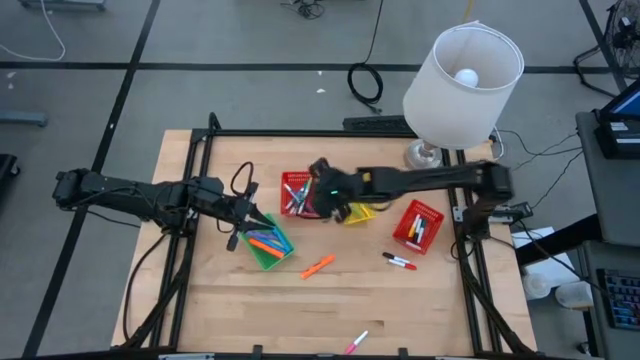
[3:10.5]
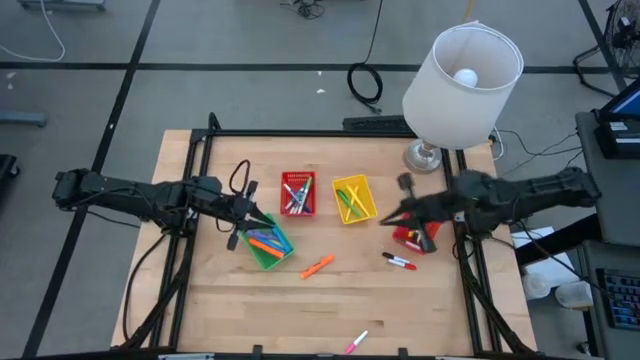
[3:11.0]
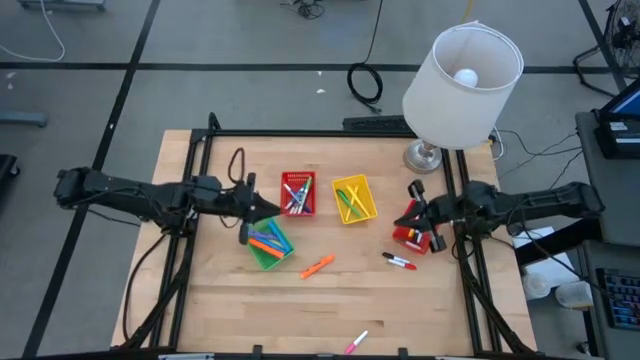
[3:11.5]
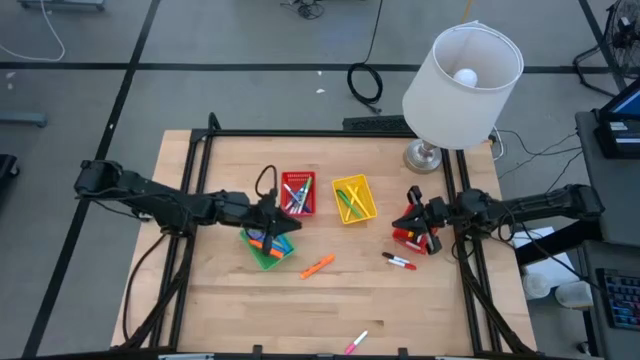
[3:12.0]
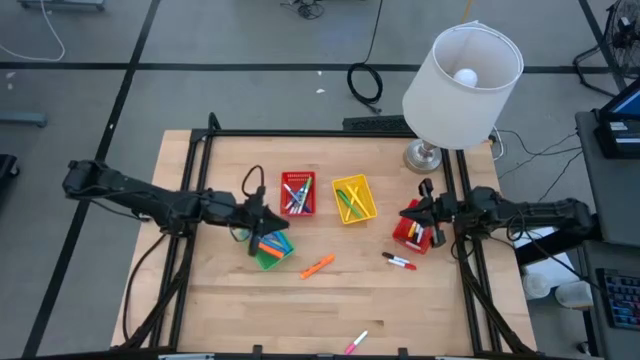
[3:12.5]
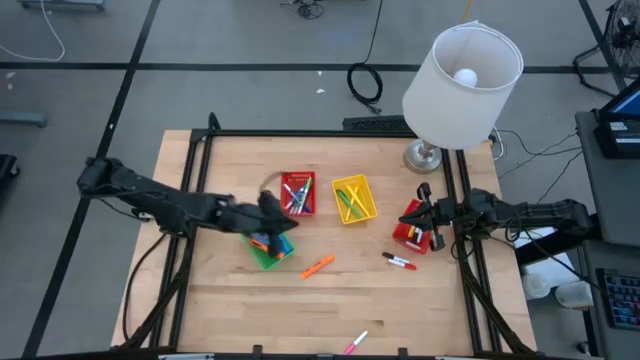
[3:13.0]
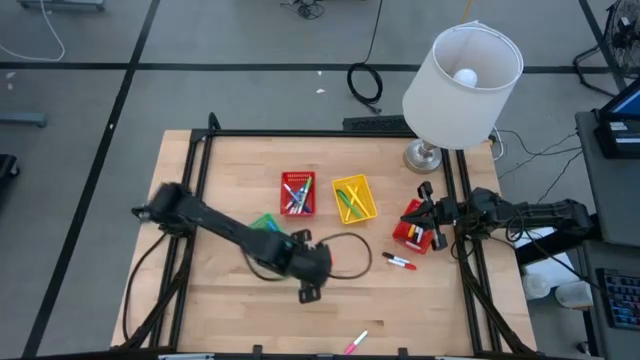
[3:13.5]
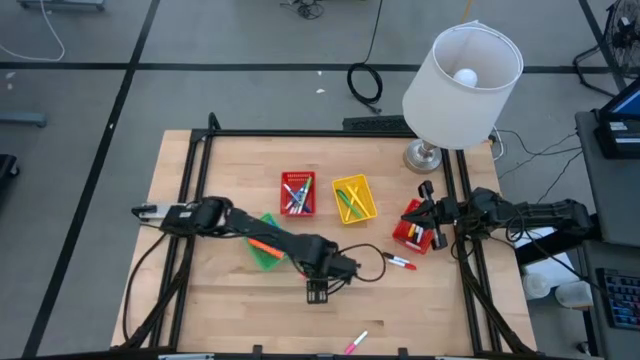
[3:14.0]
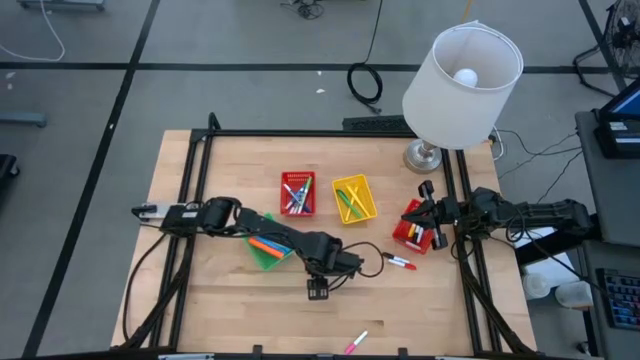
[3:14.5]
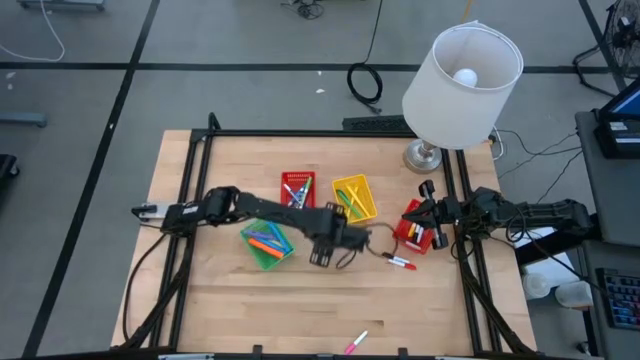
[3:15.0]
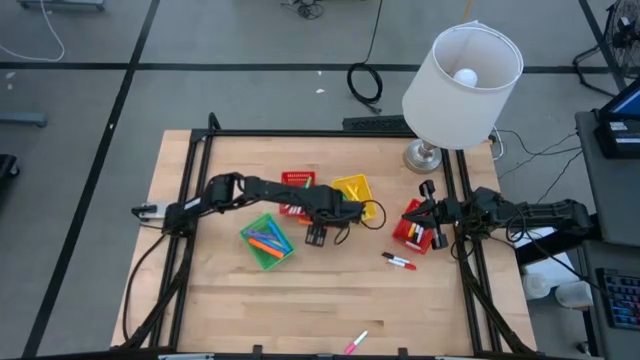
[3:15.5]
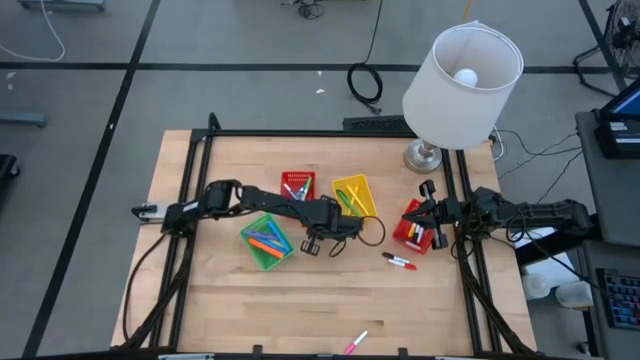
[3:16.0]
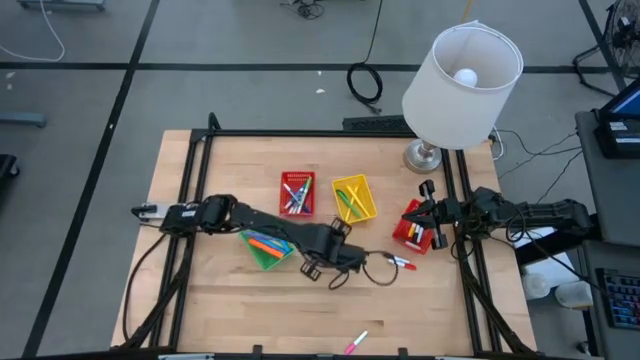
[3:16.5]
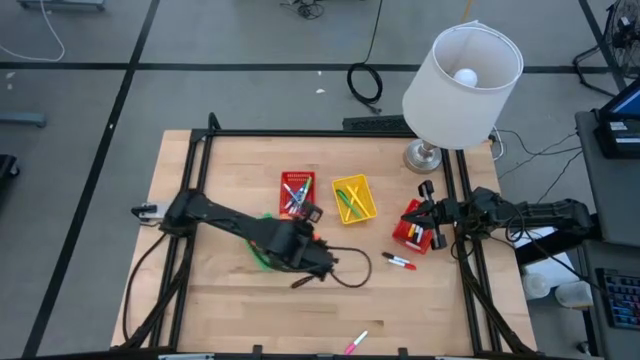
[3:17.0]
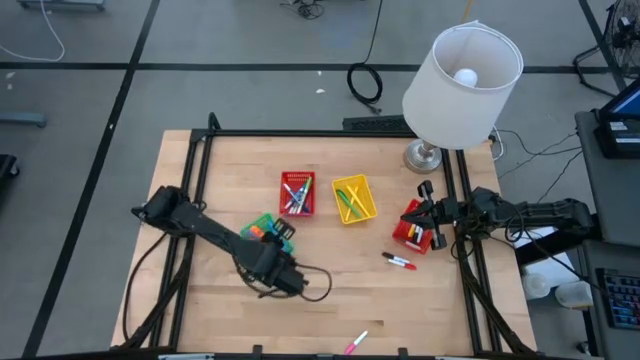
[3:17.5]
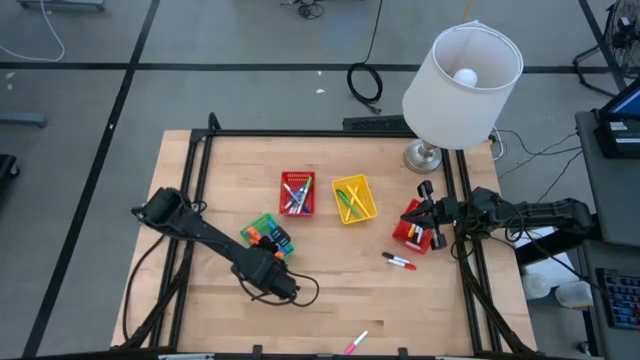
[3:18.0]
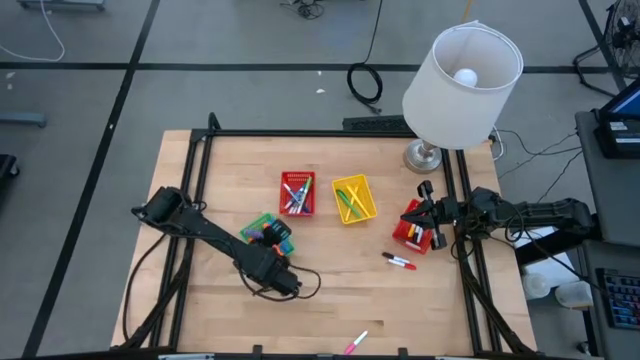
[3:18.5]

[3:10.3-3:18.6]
Task: Pick & Place Markers
Put the orange highlighter into the green bin

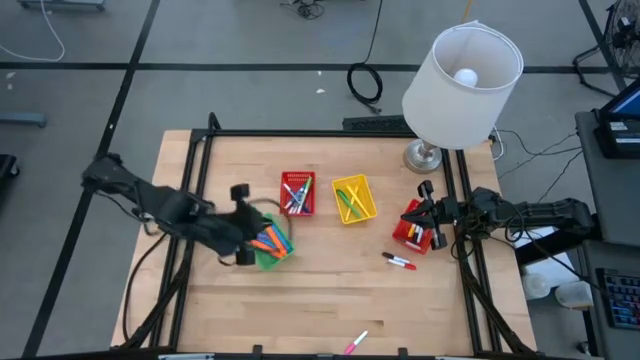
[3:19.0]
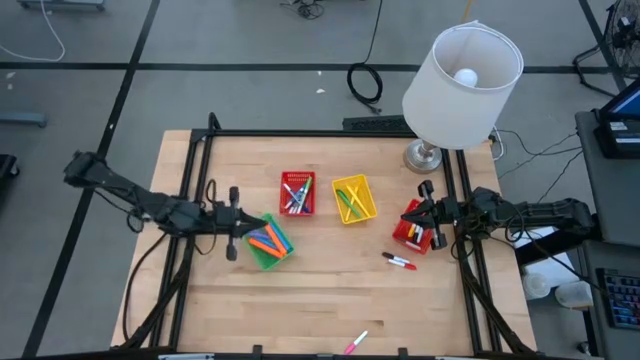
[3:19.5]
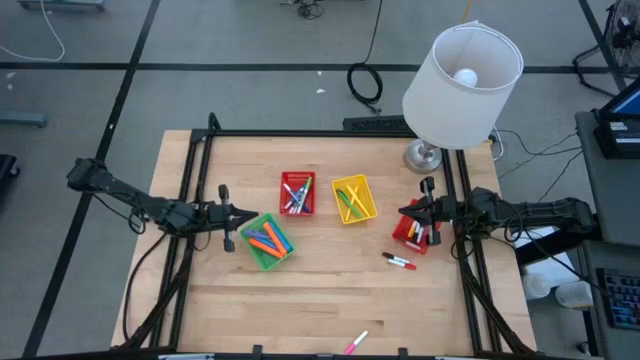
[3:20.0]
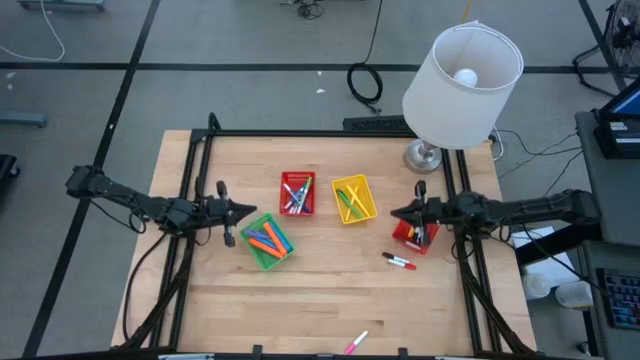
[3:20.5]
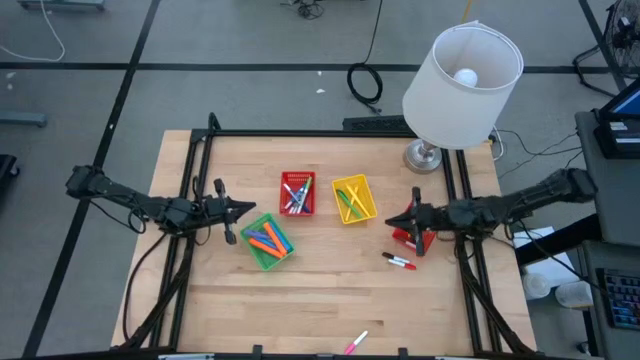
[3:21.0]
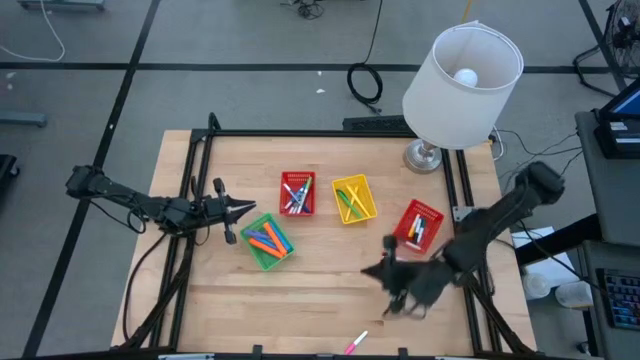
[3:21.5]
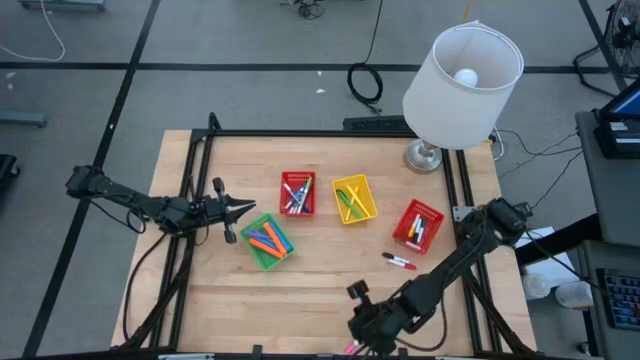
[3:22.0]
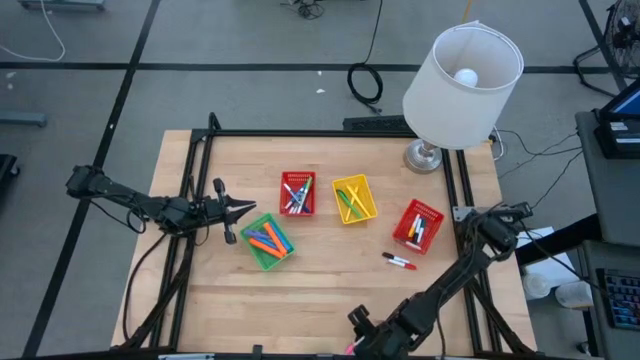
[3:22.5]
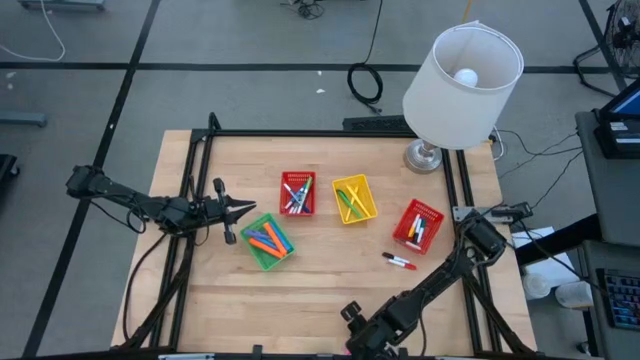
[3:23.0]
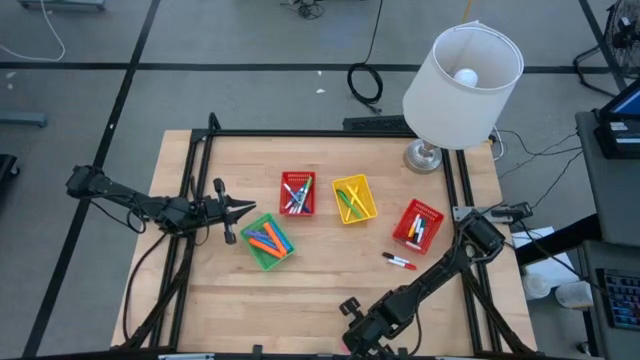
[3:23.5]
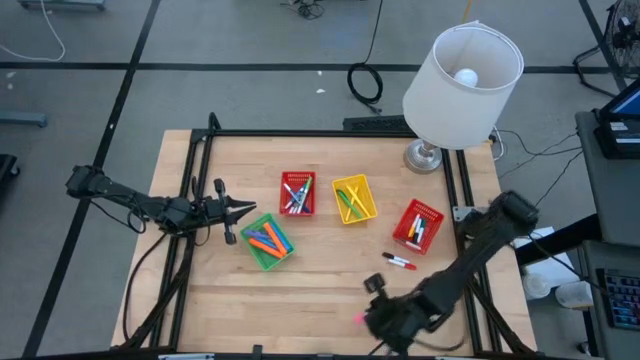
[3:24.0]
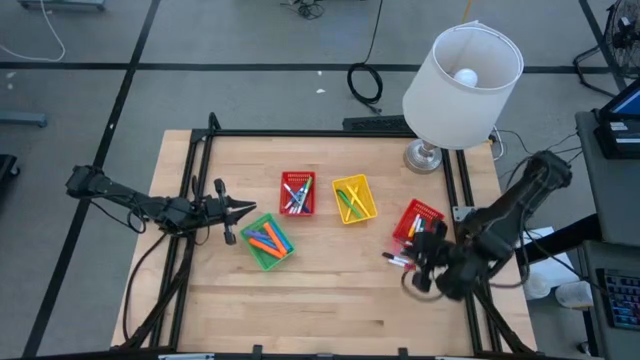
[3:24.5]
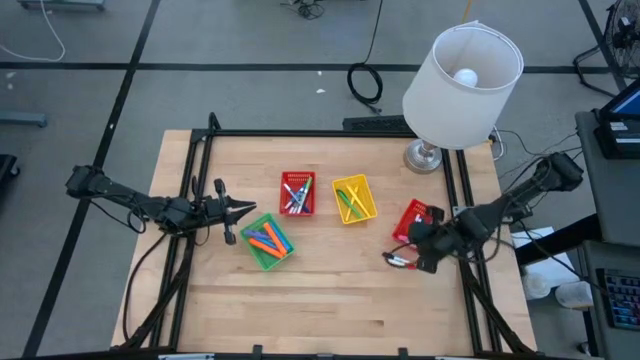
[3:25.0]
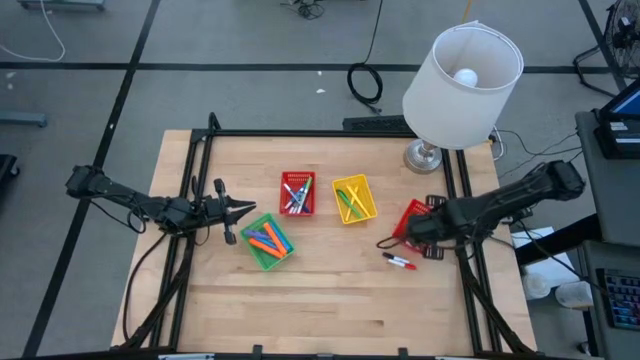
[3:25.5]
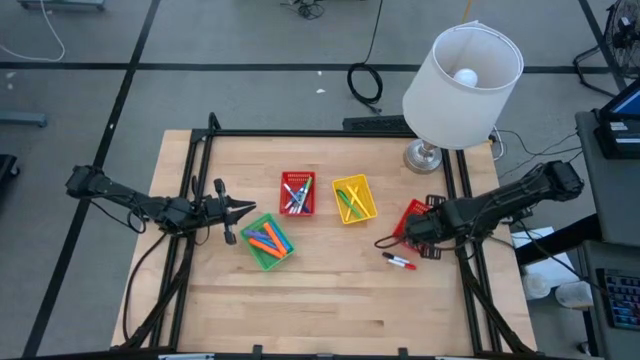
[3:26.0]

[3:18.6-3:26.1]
Put the pink highlighter into the right red bin

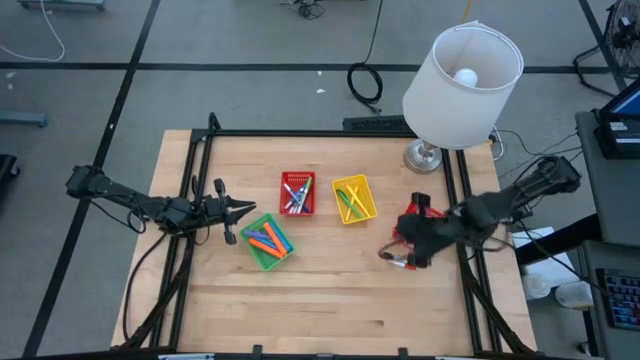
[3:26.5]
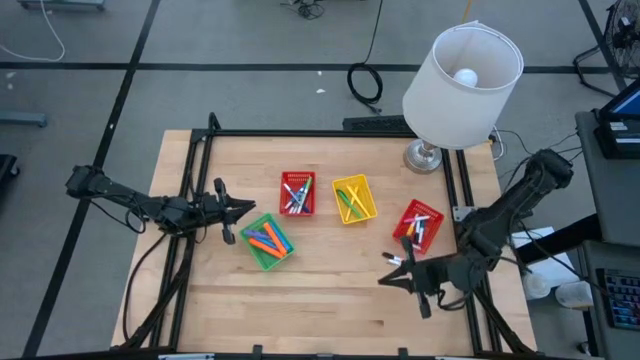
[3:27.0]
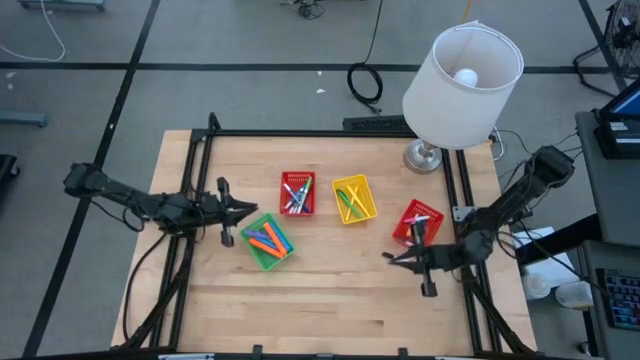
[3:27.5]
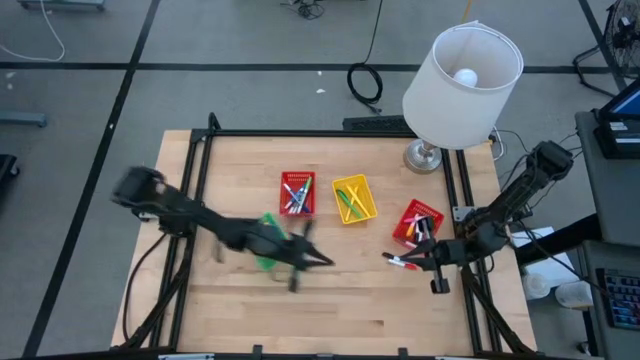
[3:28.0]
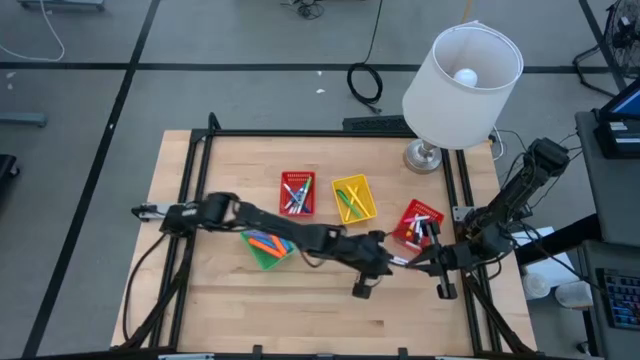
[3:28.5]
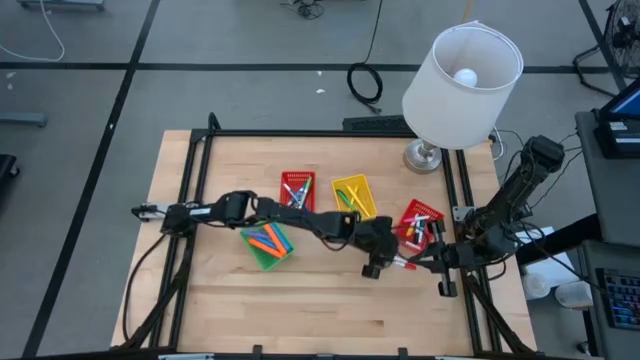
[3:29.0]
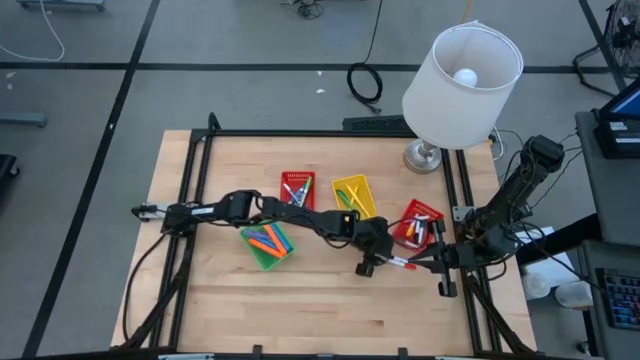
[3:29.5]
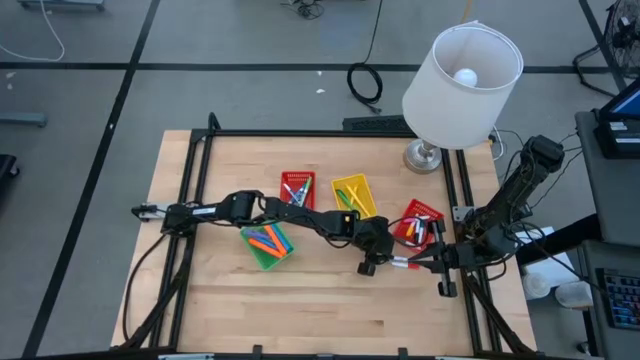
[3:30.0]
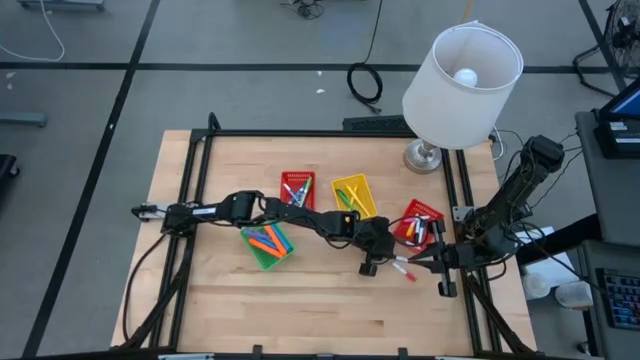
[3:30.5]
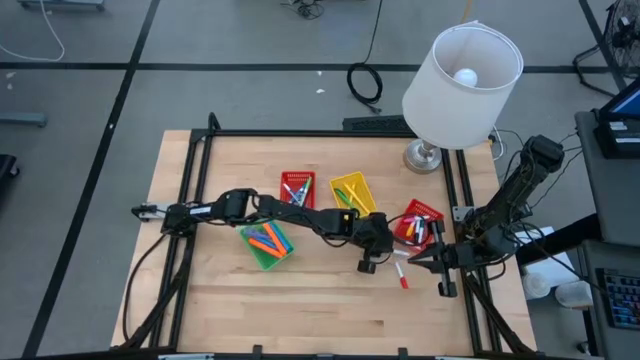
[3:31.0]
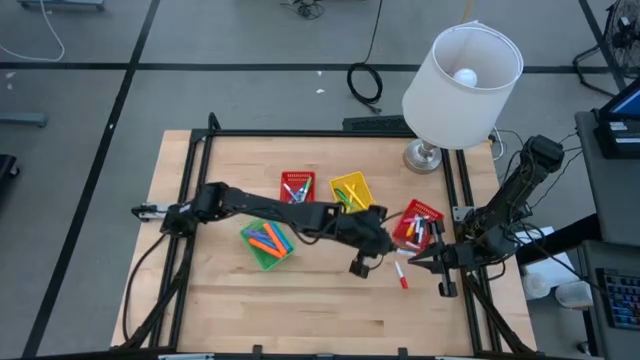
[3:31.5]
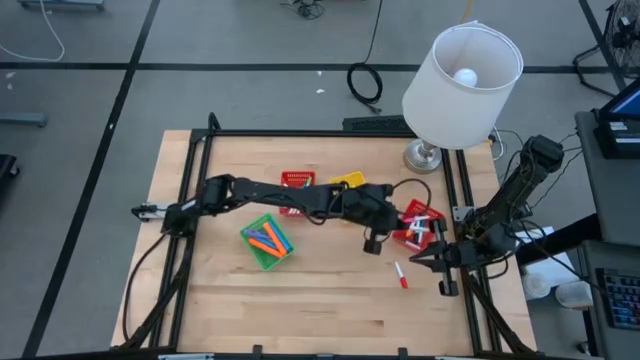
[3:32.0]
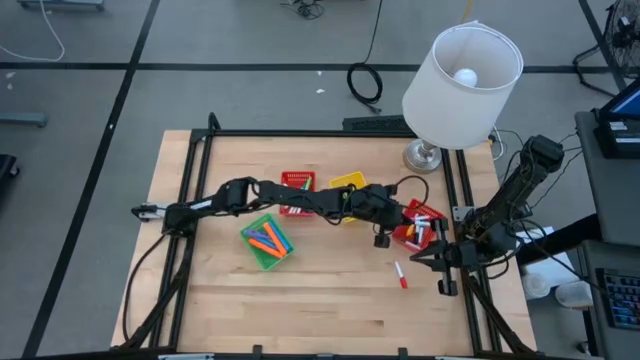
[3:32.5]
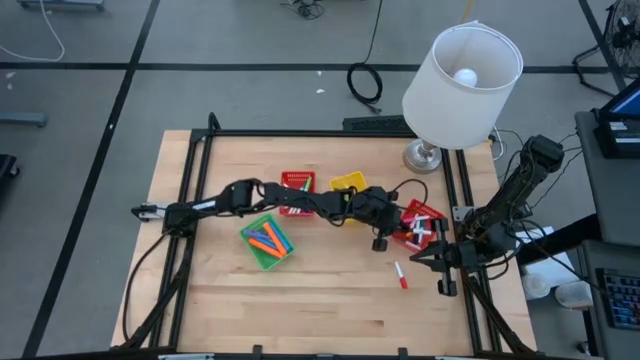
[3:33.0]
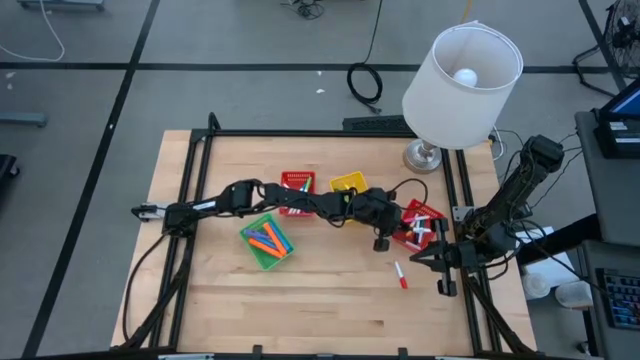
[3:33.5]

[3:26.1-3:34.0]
Put the black highlighter into the right red bin
